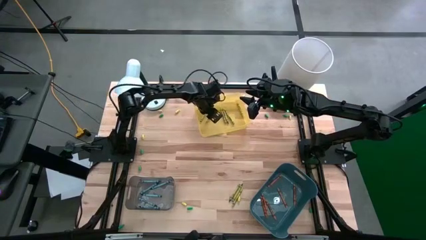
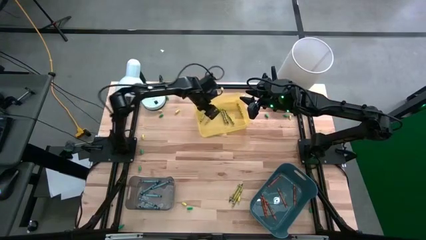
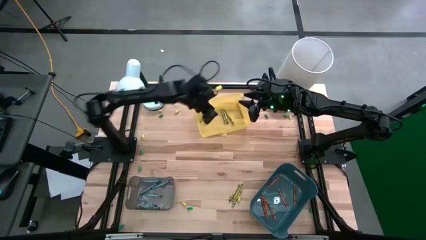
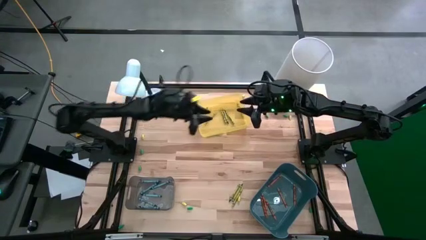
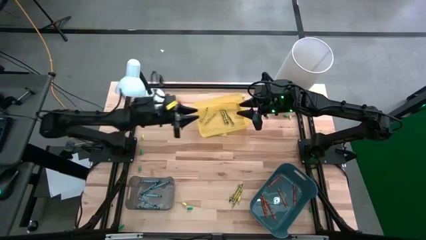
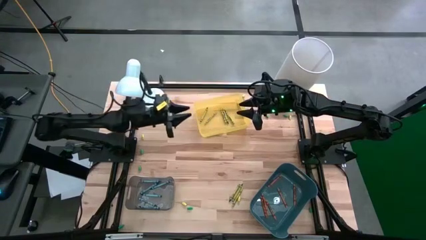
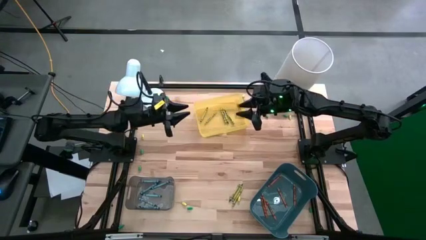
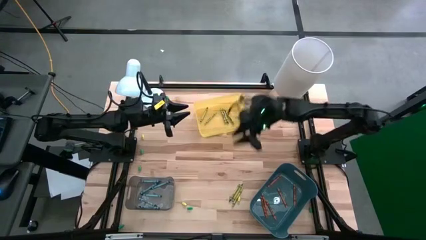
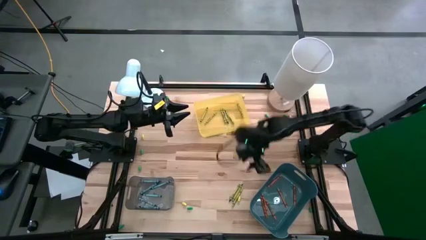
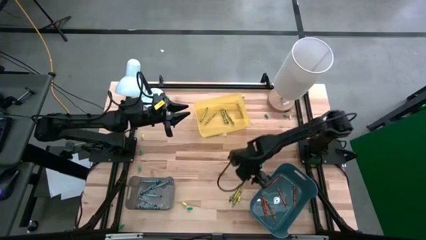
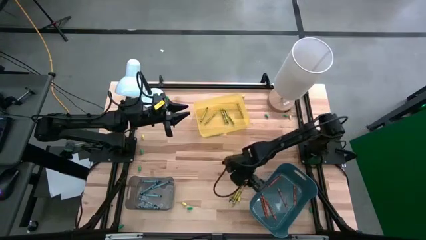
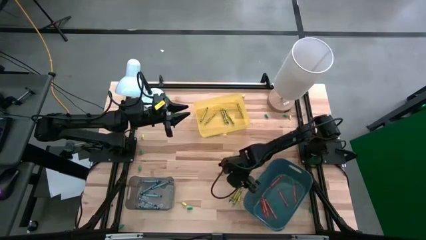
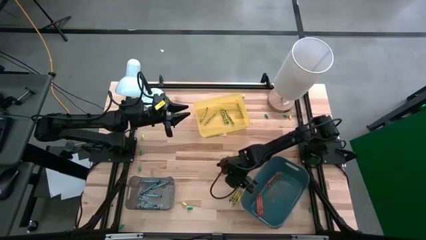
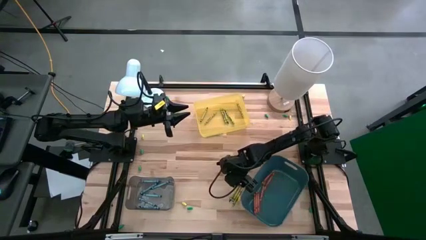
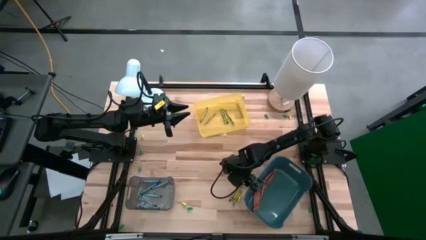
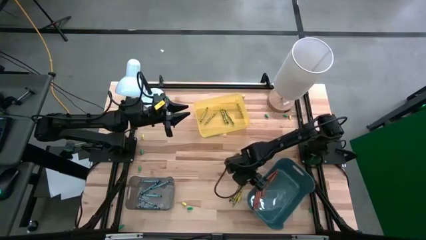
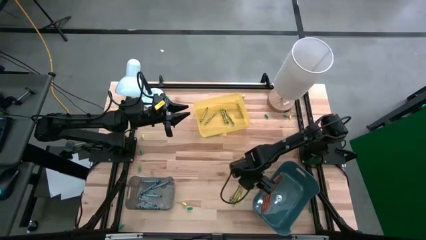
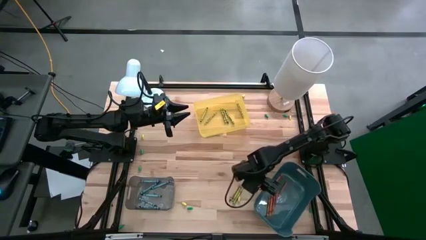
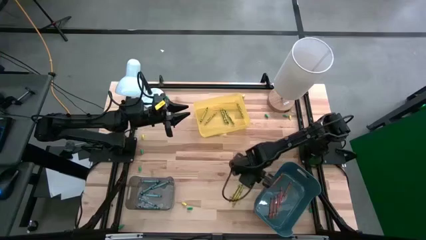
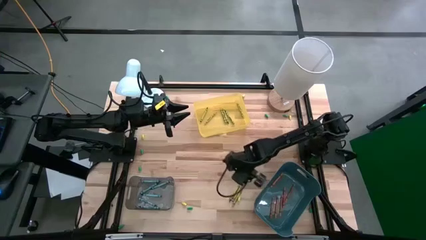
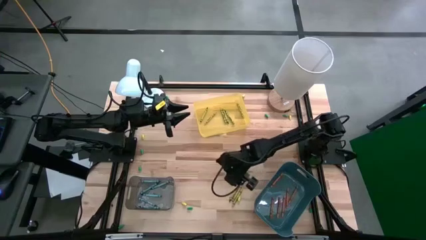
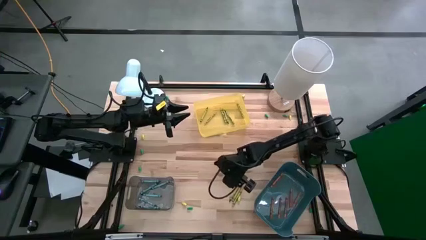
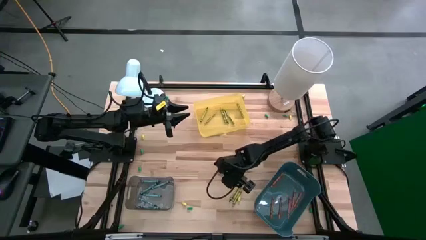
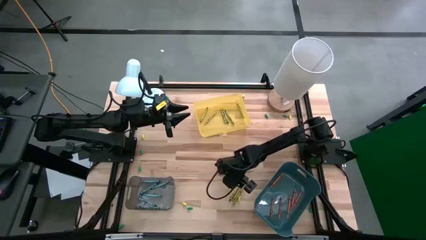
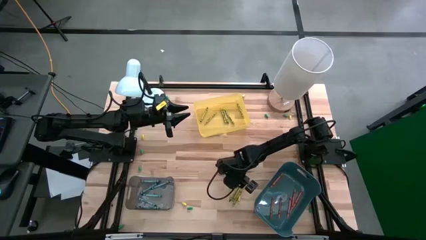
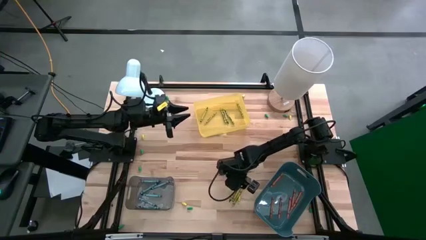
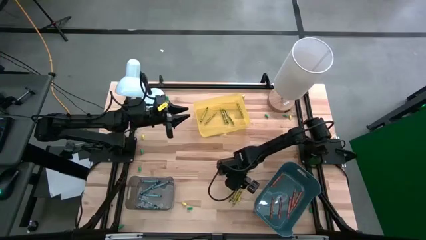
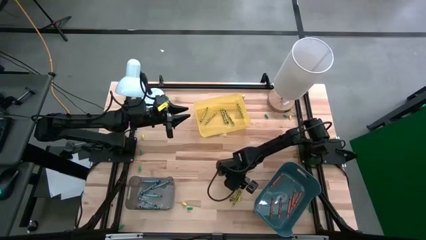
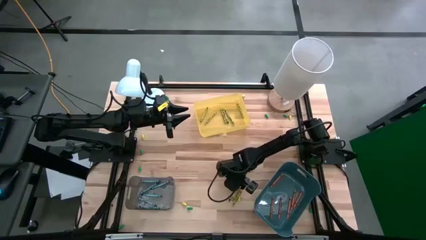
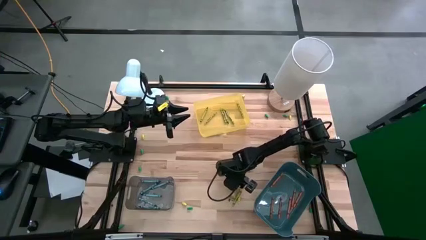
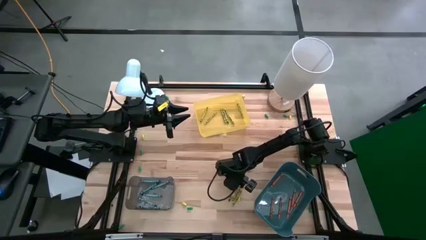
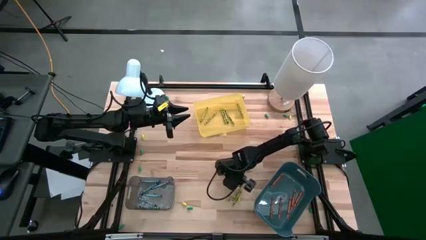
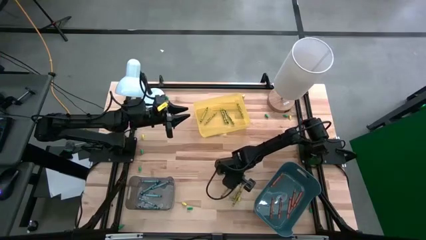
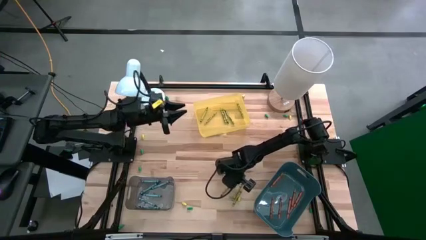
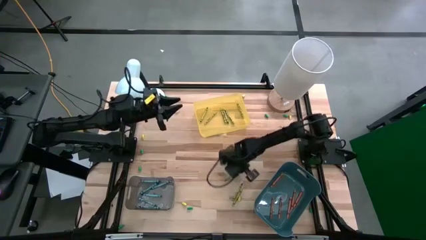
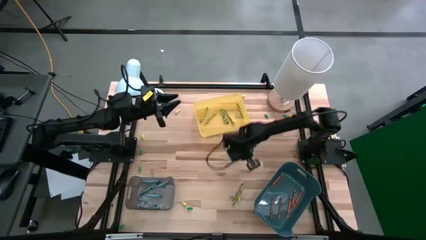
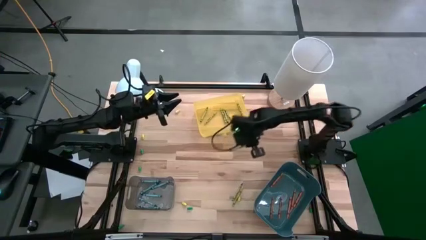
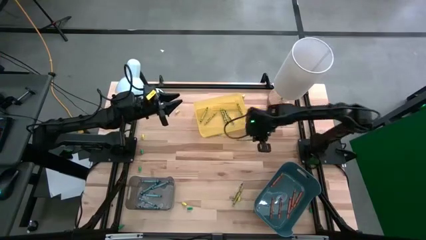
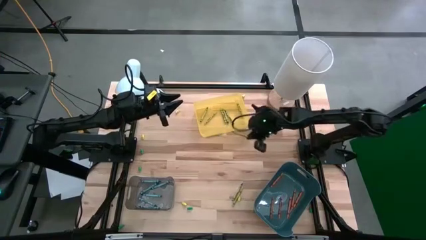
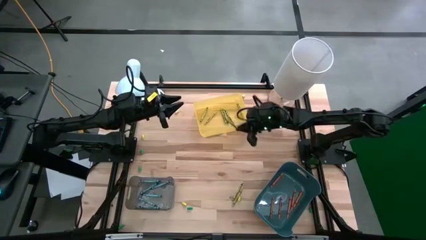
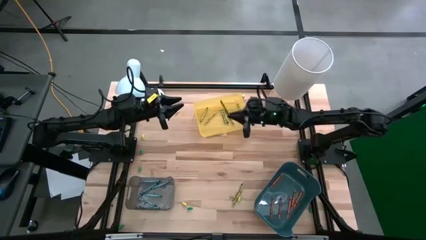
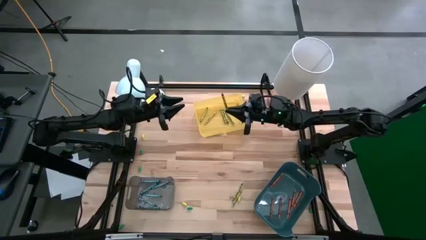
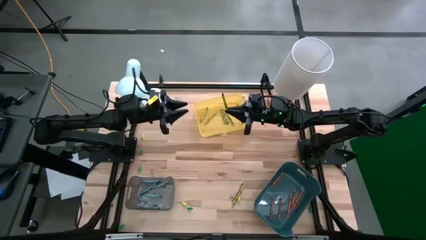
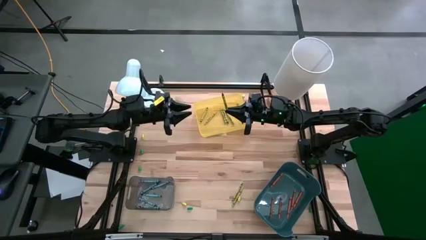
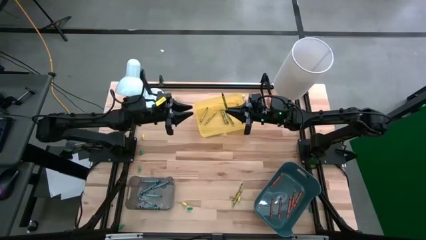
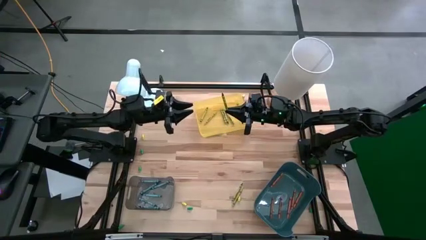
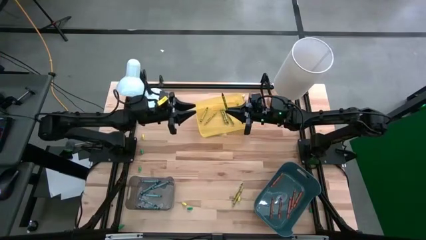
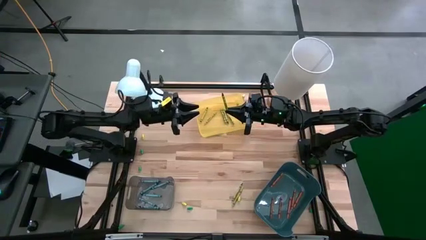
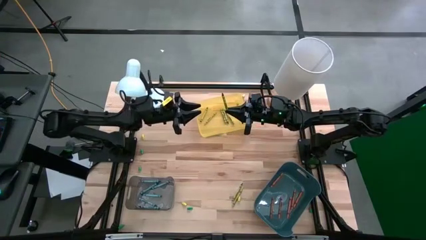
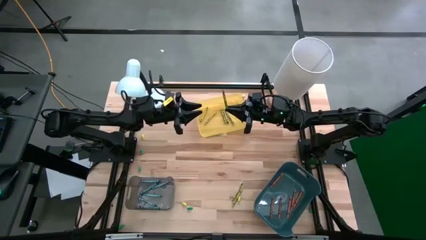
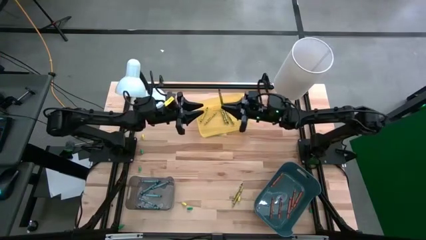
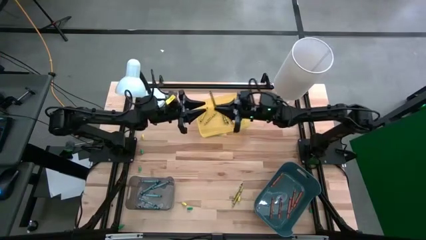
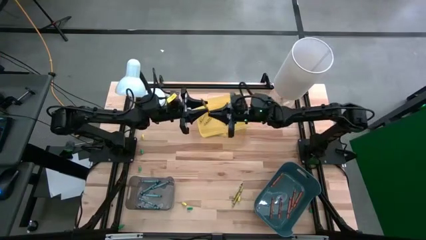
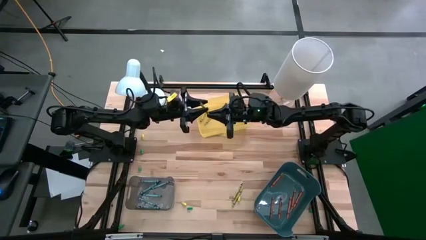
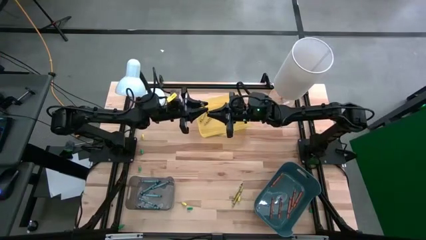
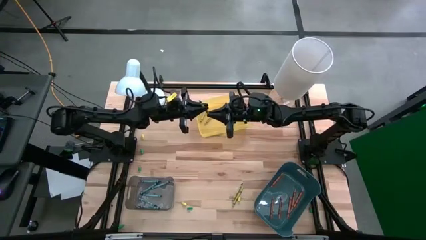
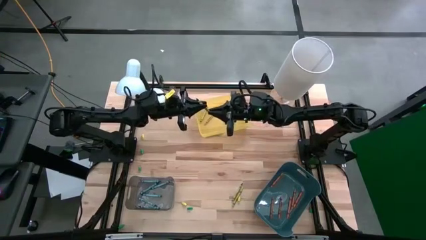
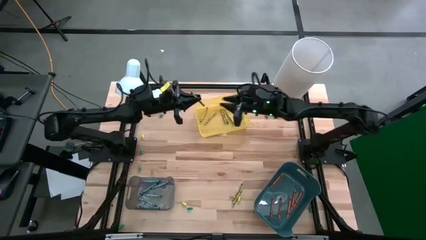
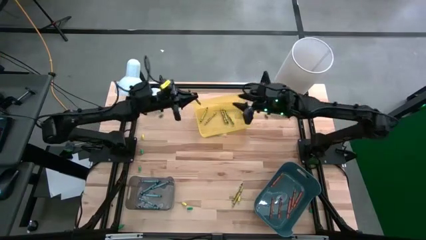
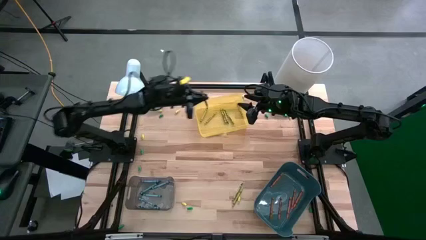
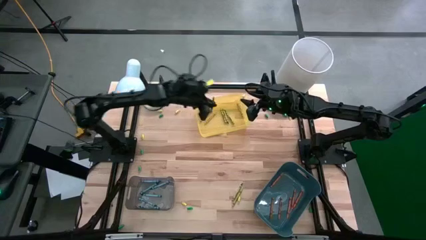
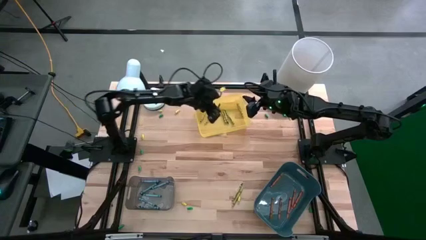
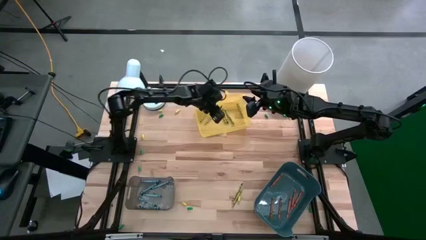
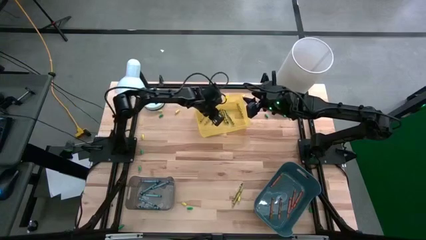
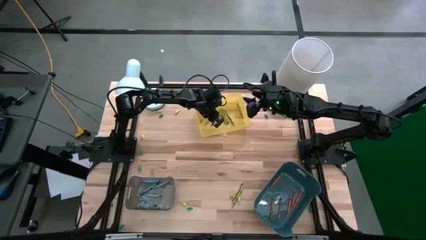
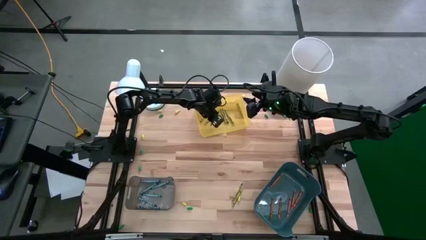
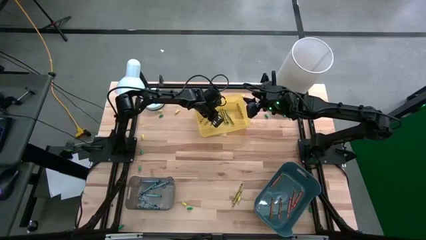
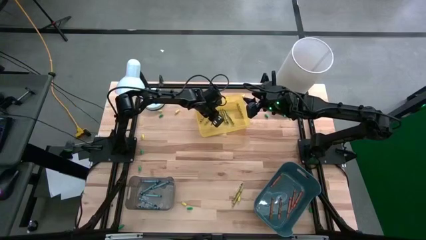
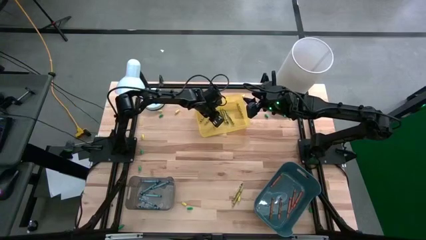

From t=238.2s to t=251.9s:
Task: Sort crayons
Put the green crayon into the yellow bin

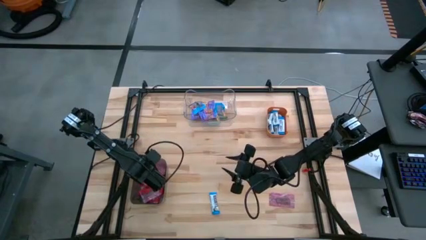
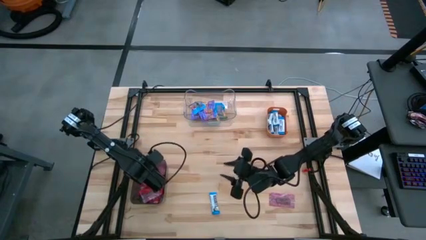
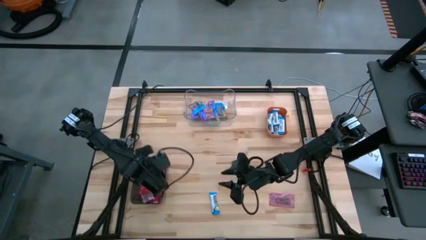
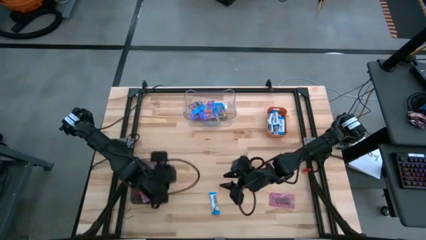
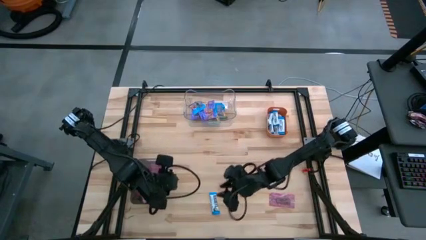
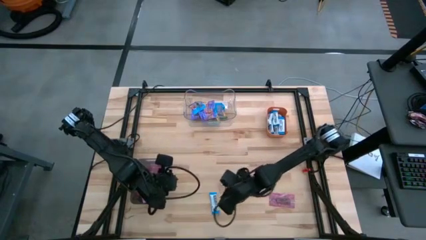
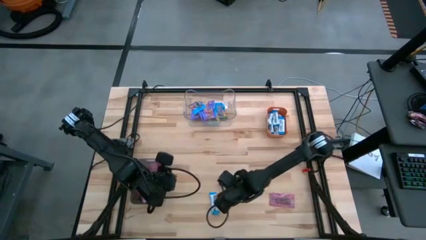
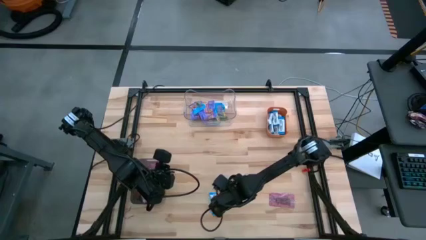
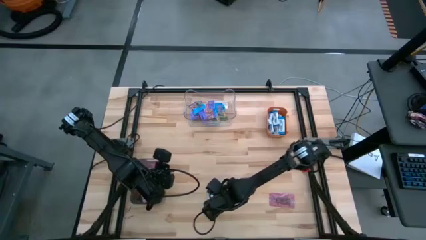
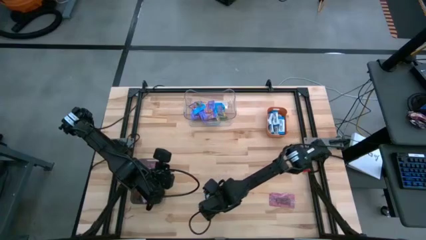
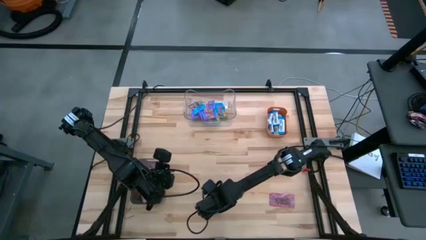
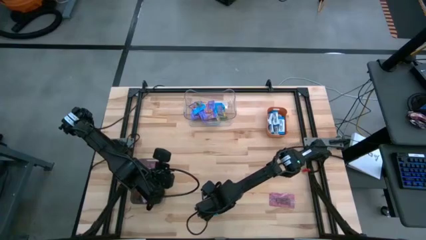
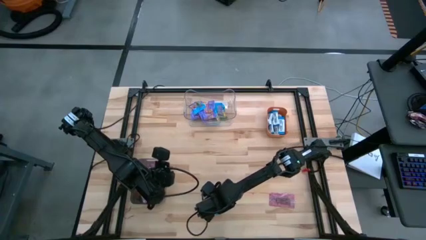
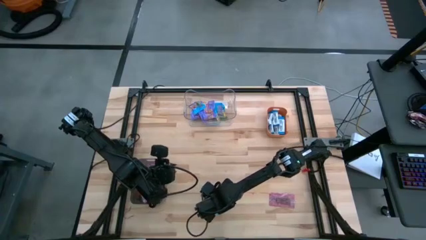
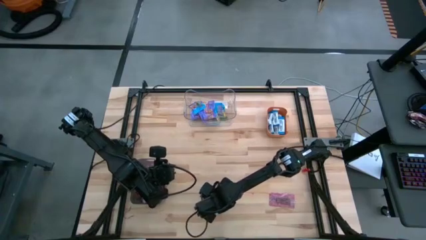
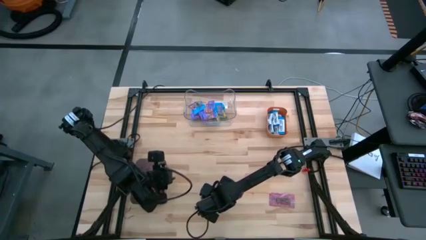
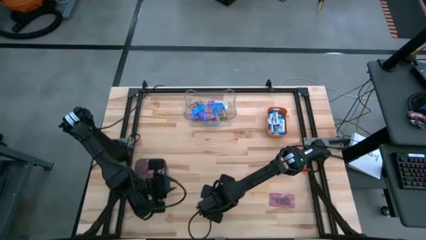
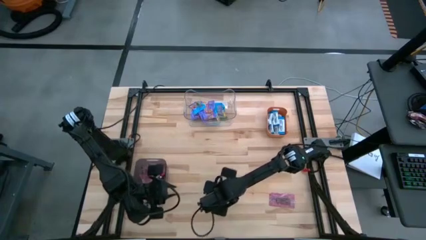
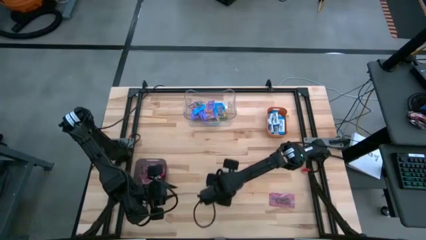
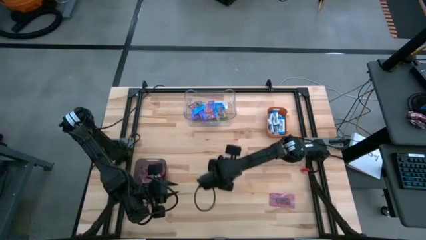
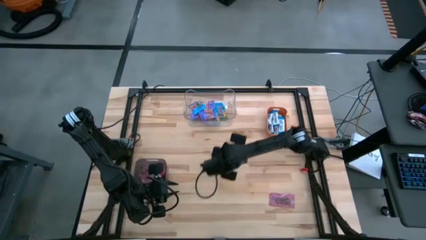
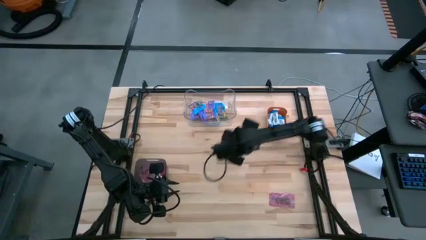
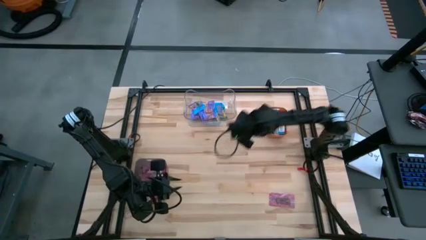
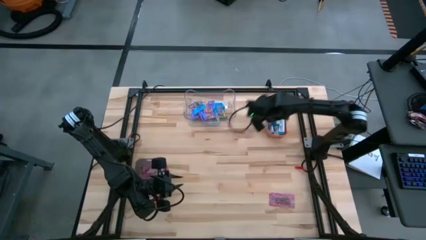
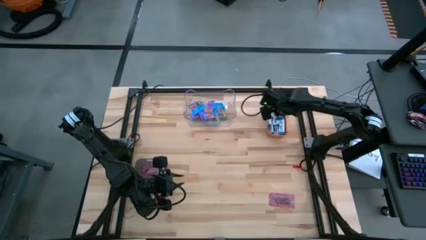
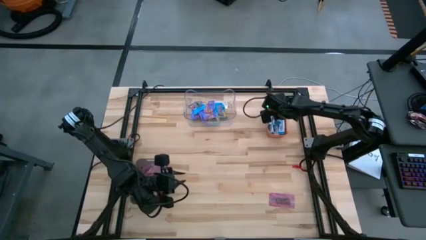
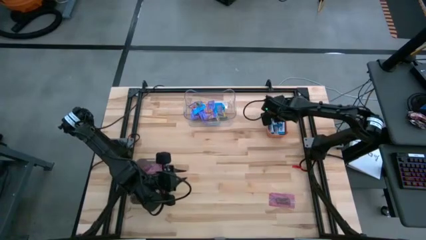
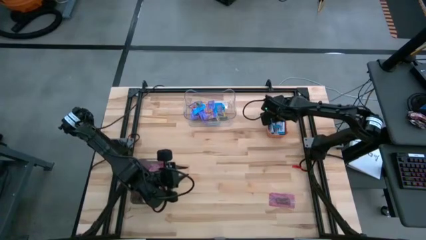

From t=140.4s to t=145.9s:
Task: Sort candy
Put the white chocolate into the orange bin
